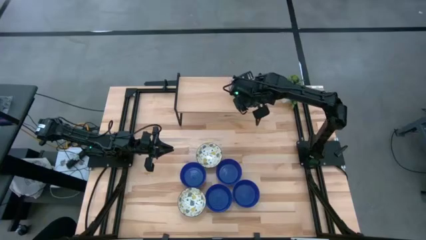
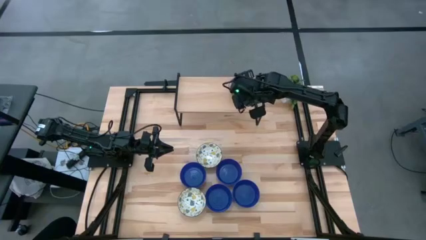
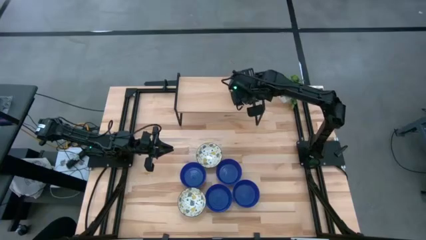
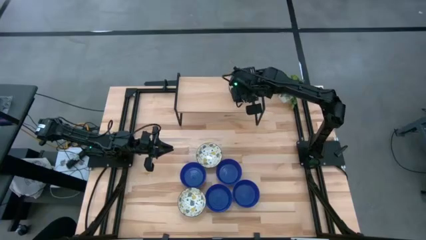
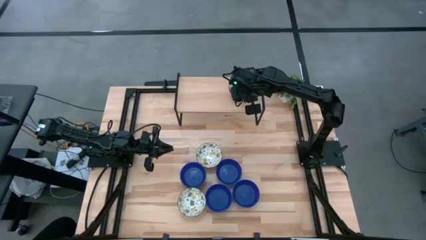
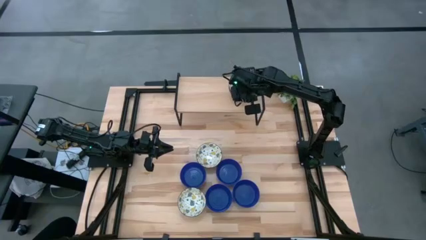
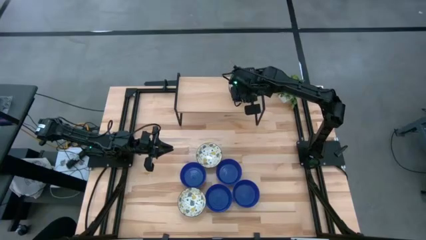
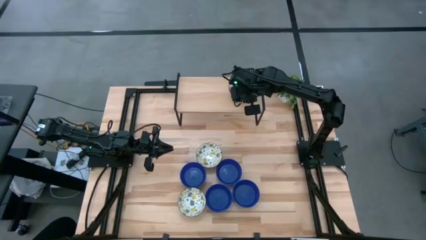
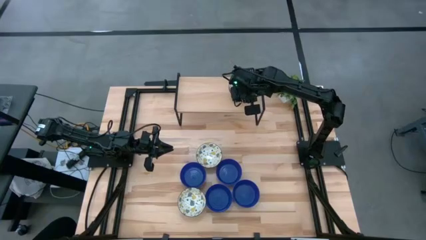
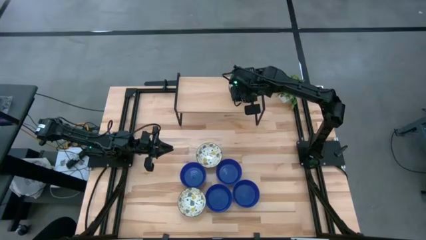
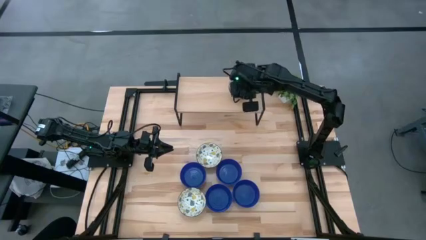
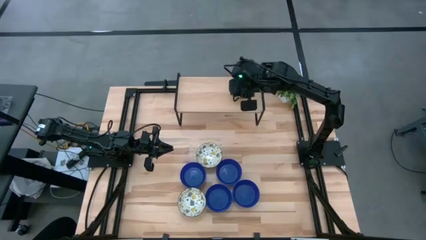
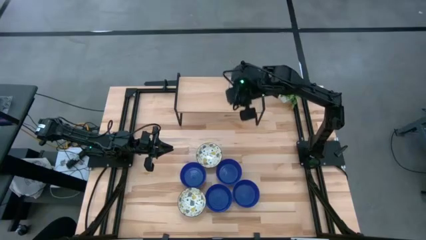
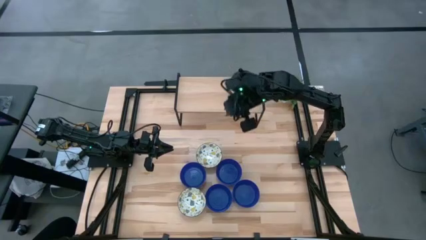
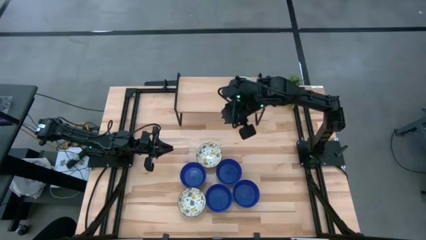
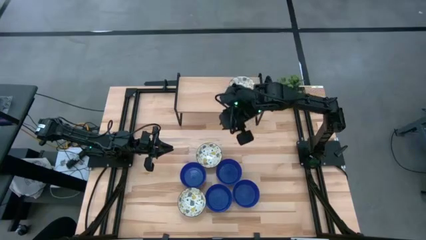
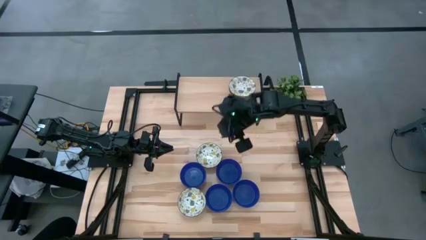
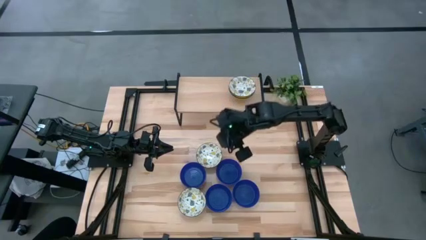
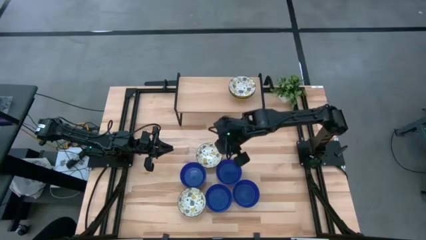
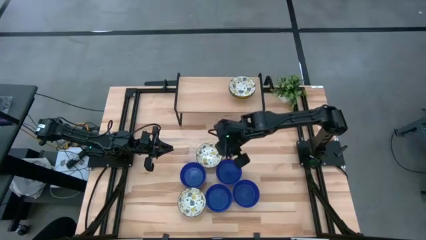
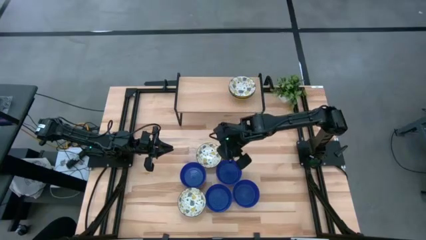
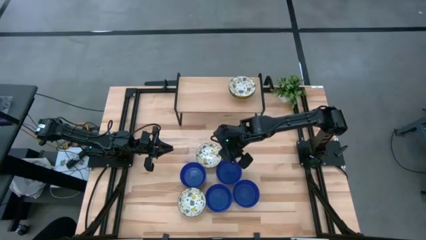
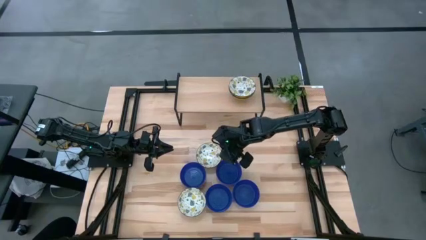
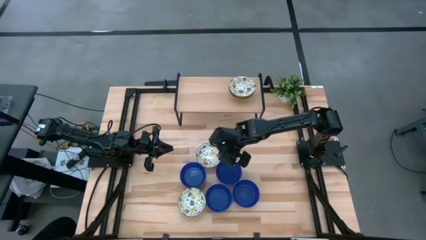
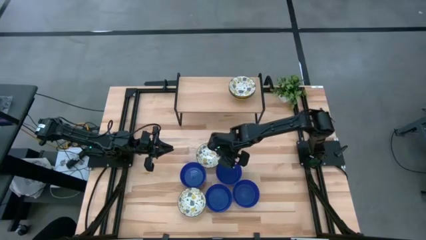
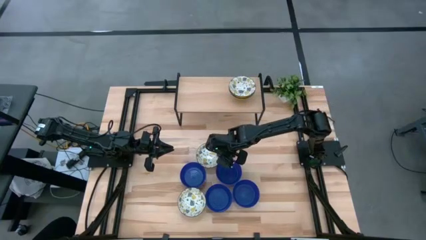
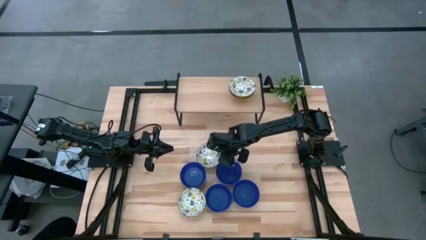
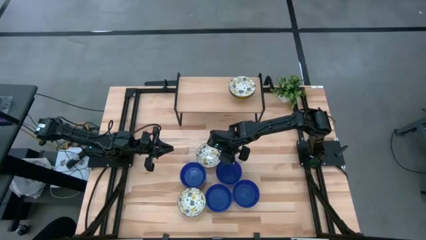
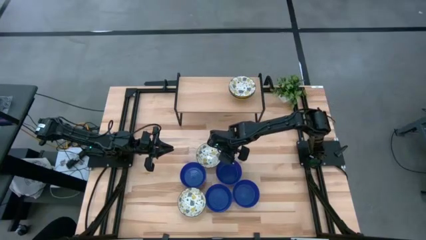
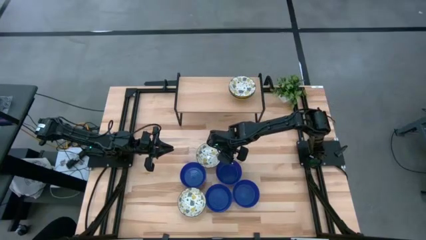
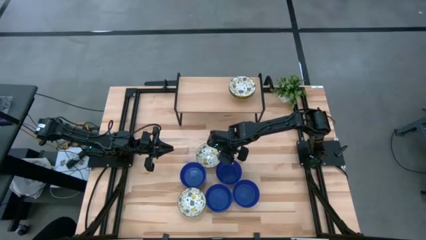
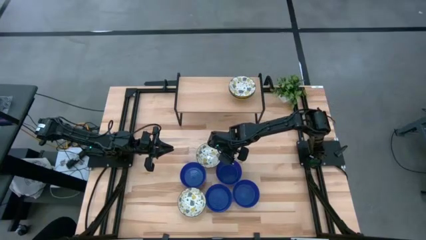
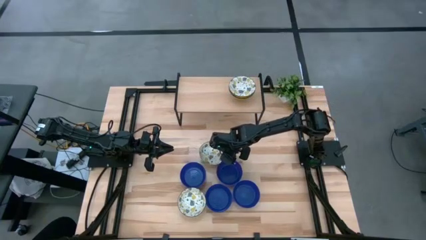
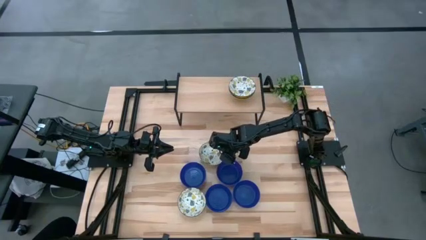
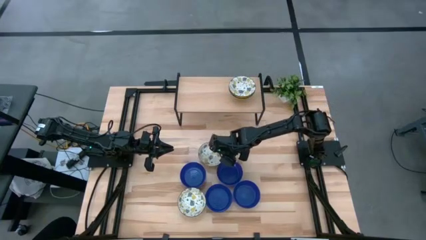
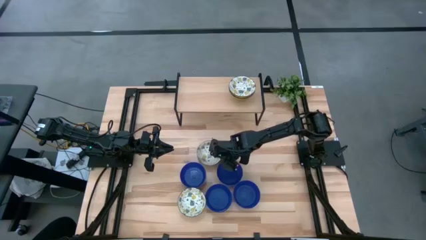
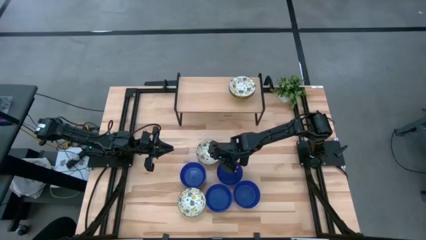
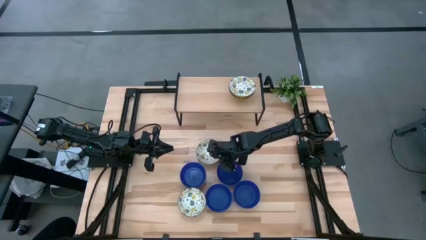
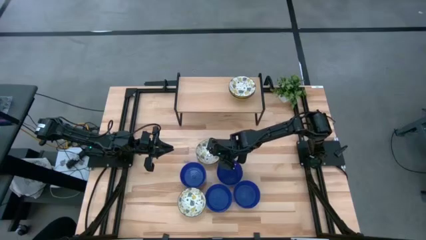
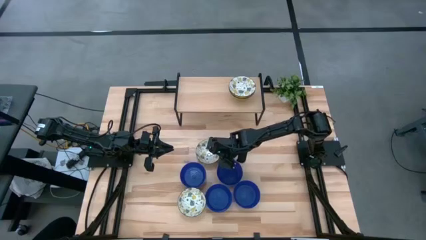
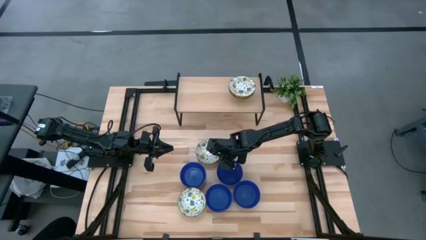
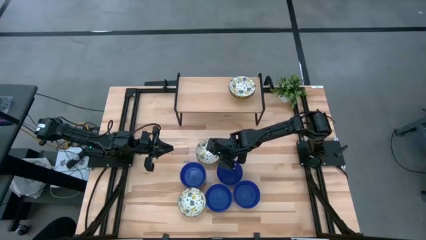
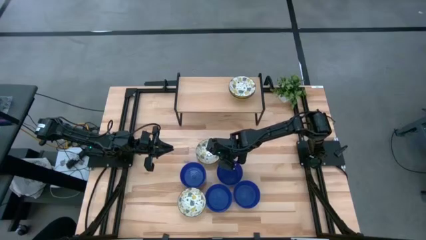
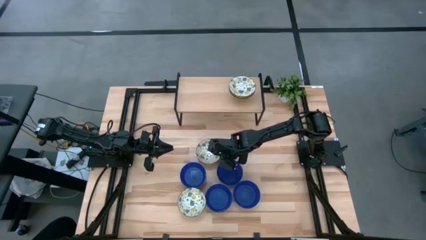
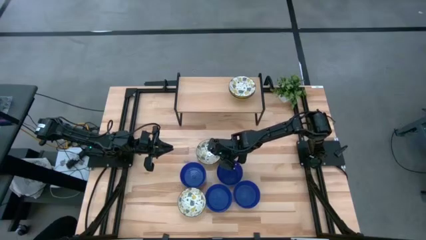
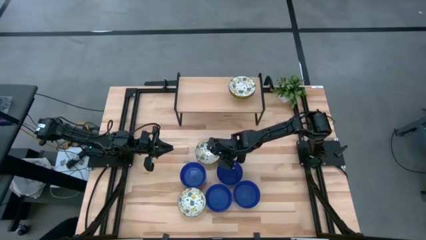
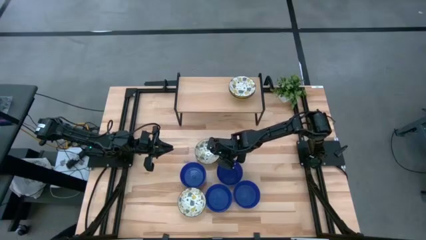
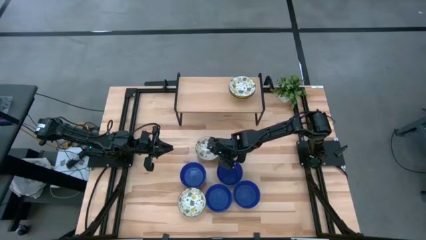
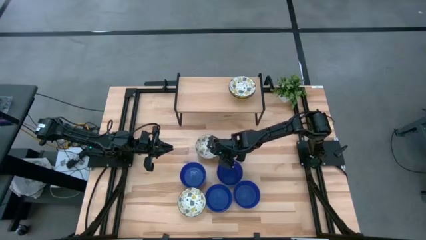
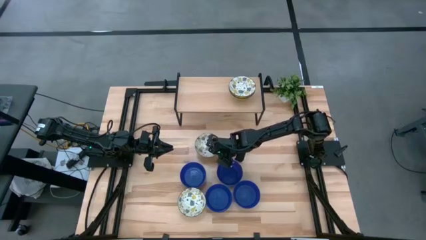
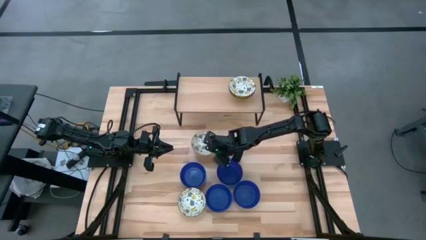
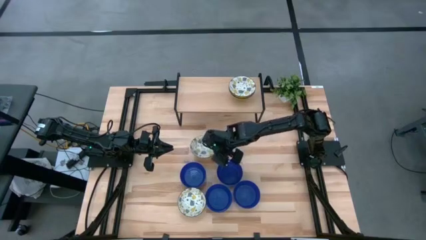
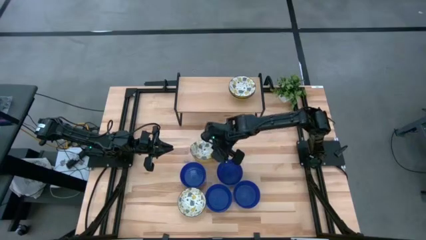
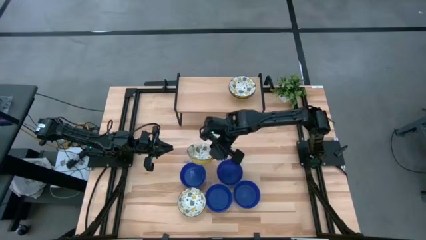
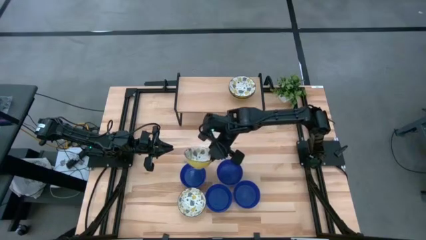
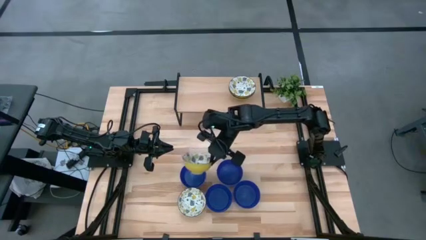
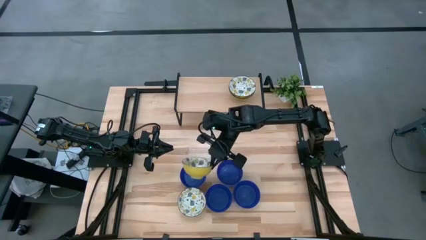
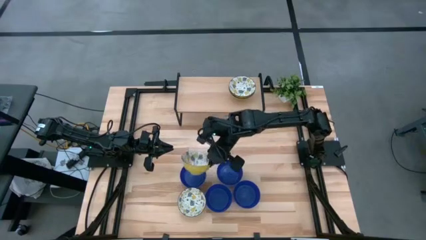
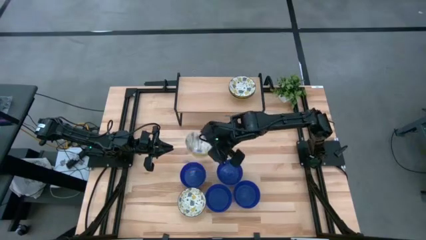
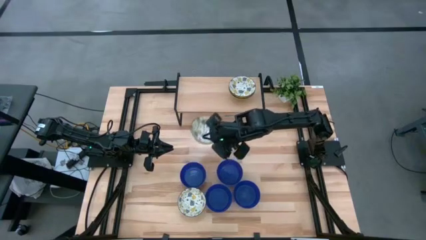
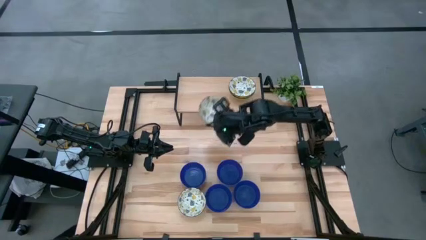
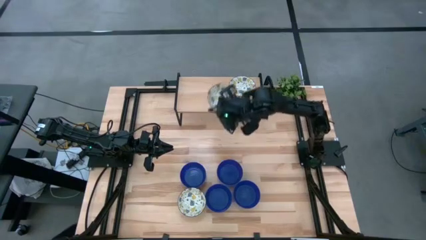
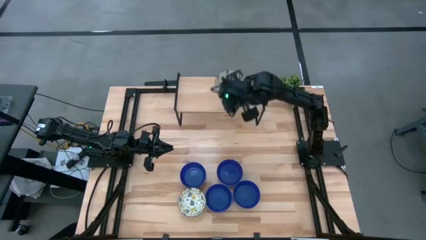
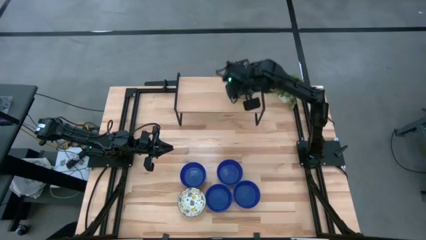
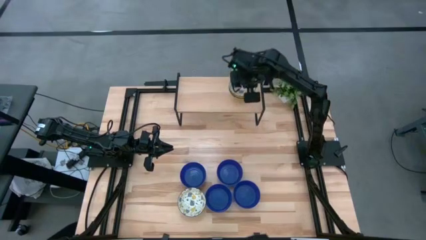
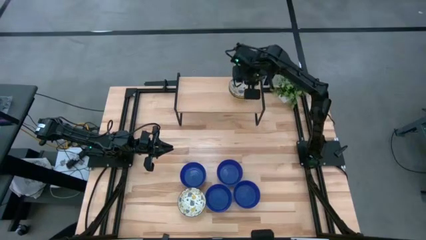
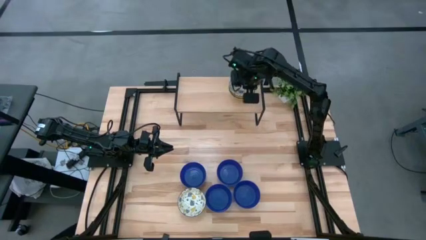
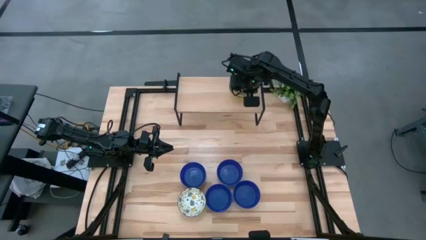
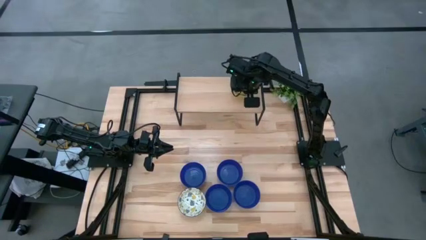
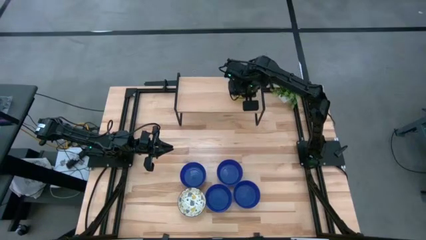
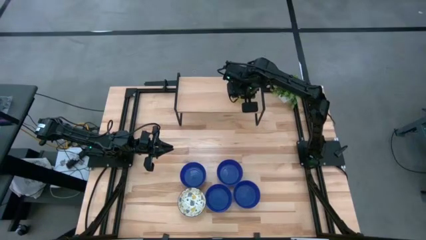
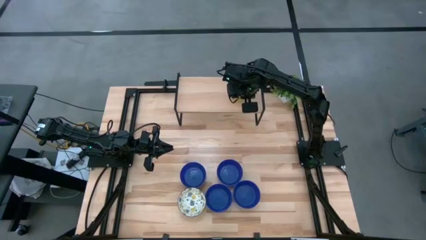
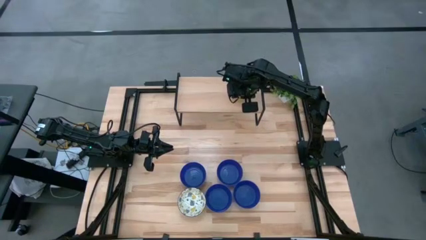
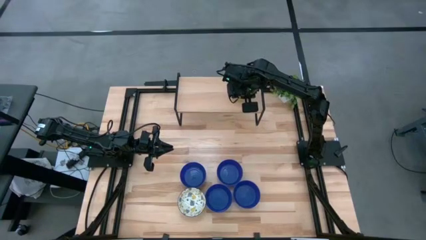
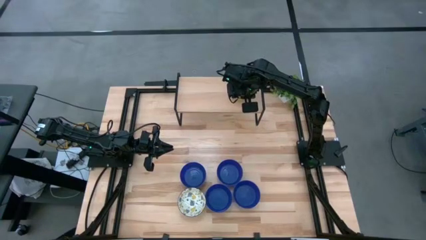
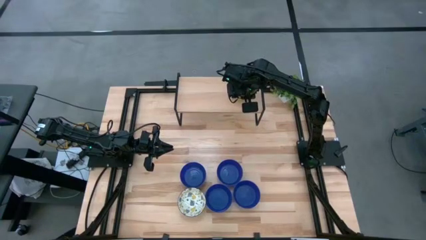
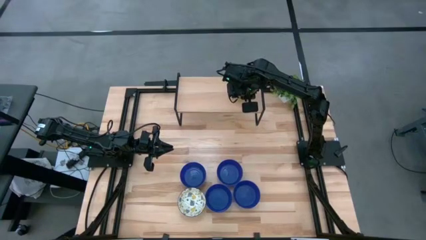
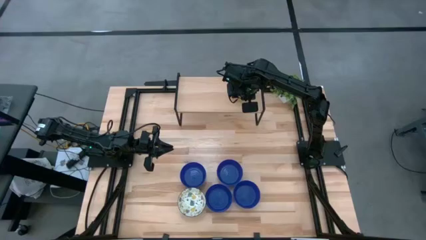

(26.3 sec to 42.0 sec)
Task: Pick & Place Mini bowls
Stack the bowl on top of the yellow bowl on the shelf
